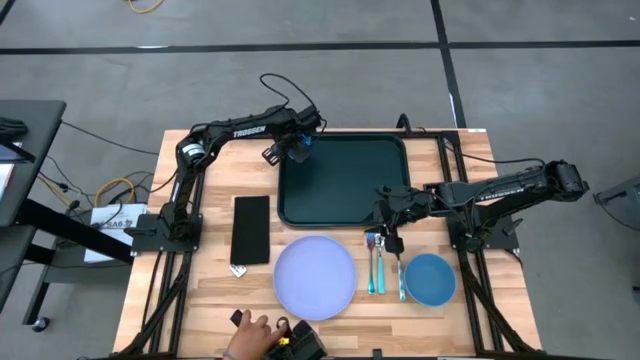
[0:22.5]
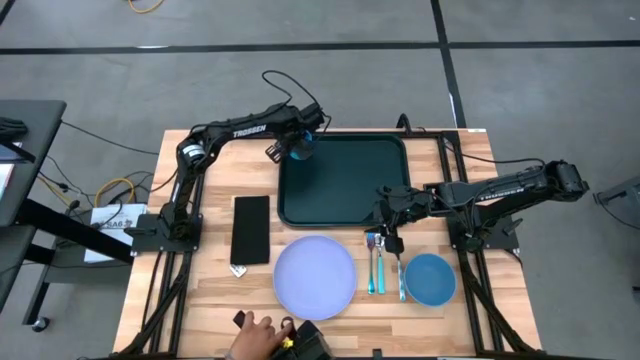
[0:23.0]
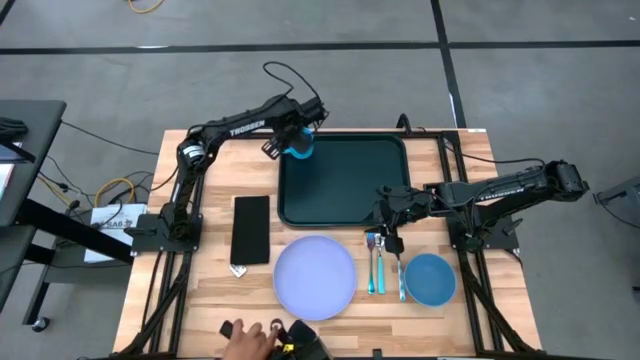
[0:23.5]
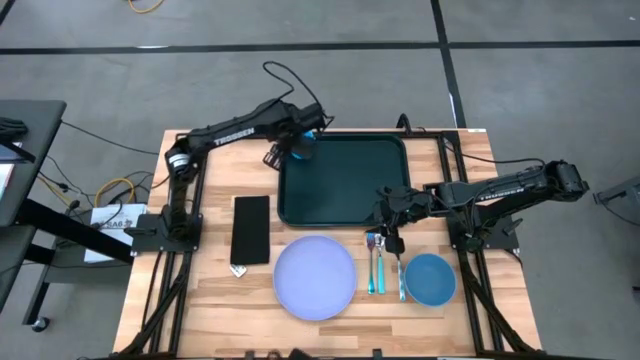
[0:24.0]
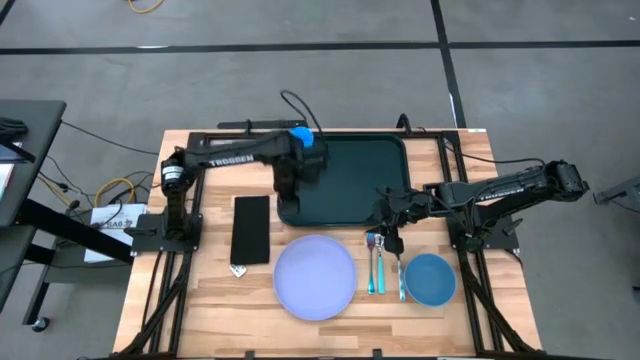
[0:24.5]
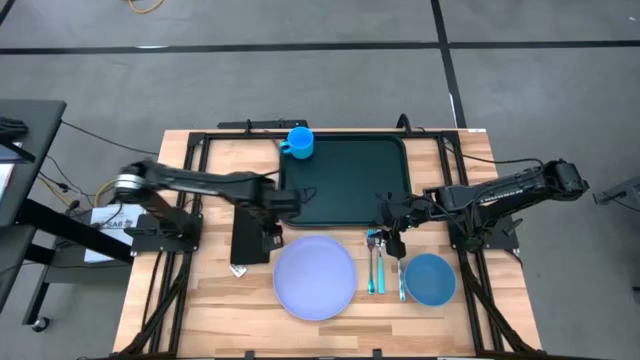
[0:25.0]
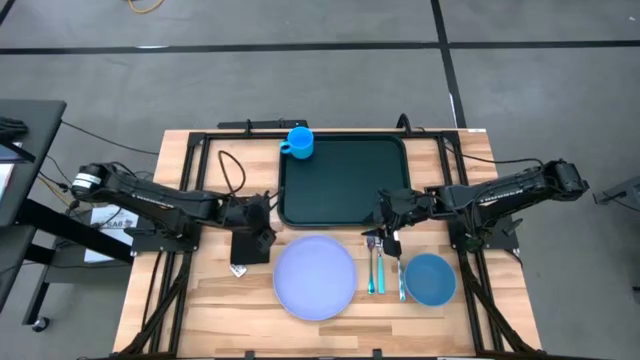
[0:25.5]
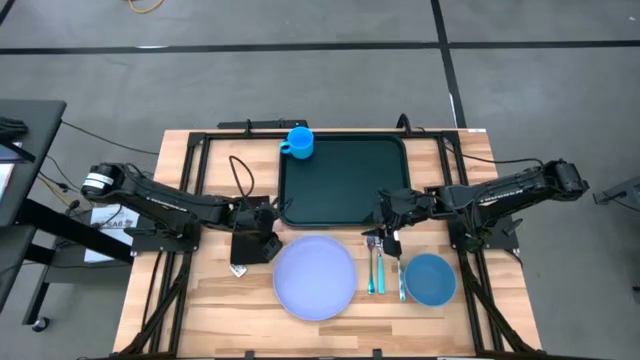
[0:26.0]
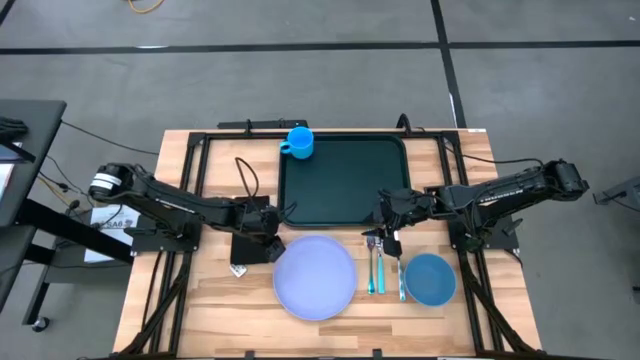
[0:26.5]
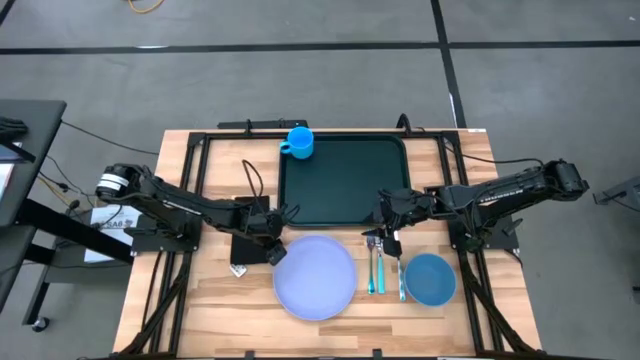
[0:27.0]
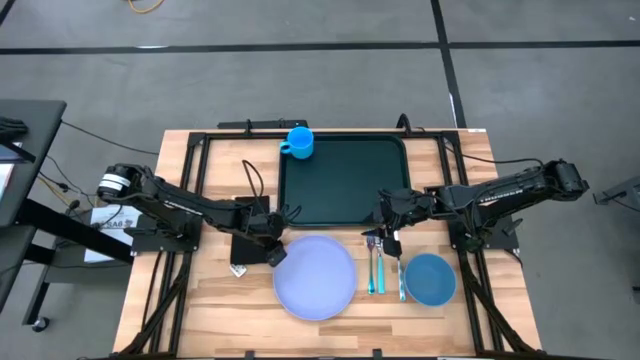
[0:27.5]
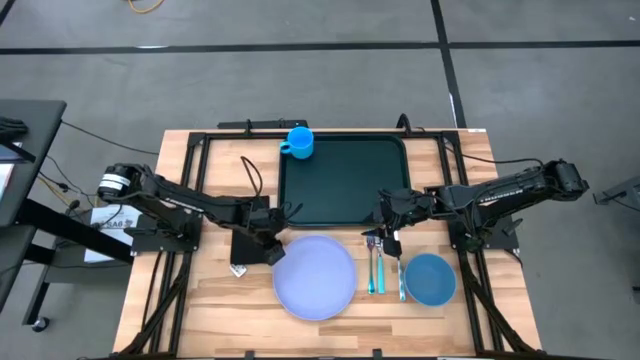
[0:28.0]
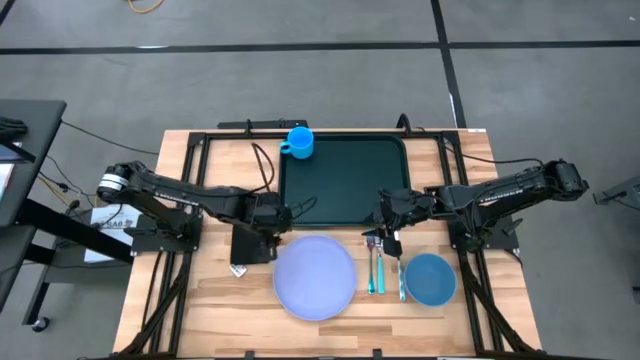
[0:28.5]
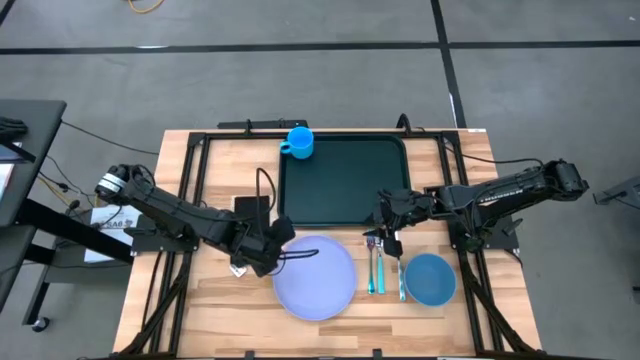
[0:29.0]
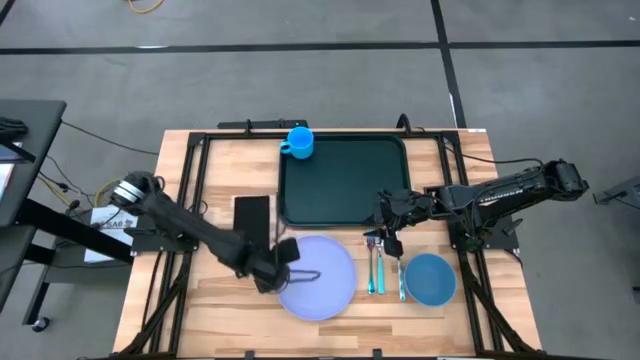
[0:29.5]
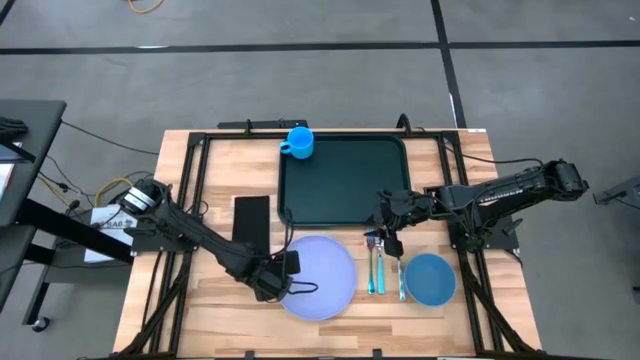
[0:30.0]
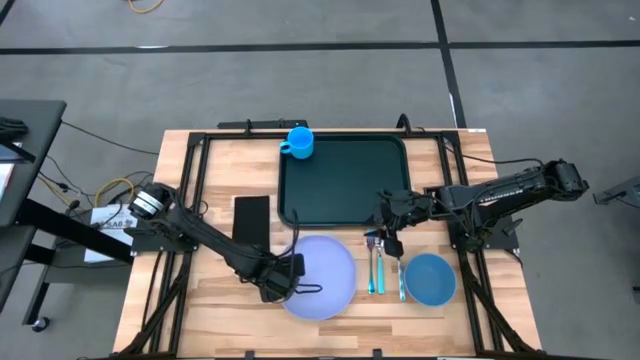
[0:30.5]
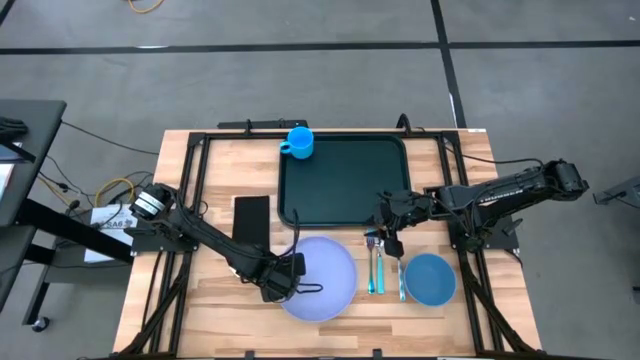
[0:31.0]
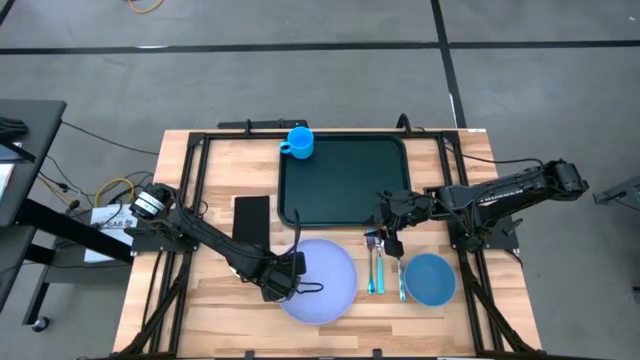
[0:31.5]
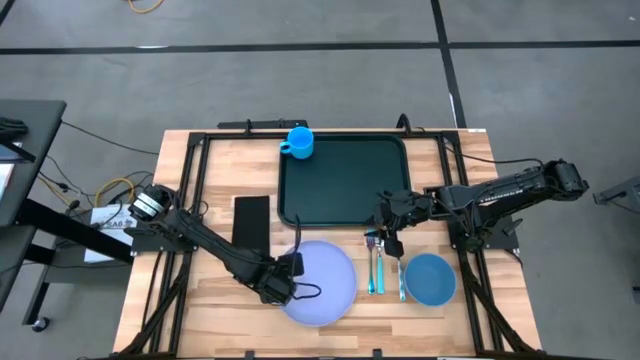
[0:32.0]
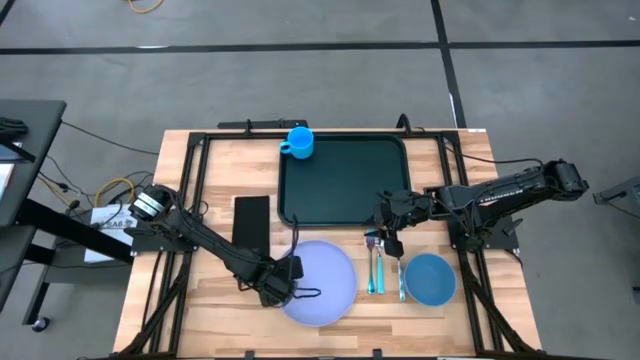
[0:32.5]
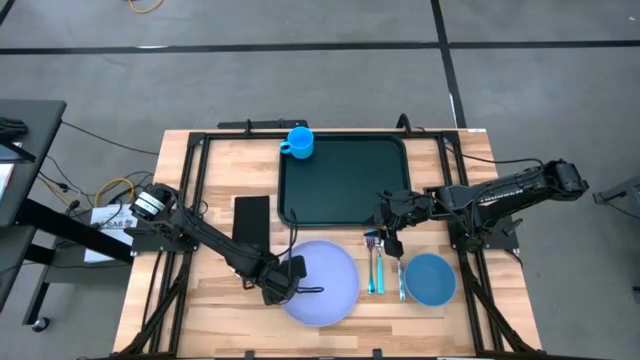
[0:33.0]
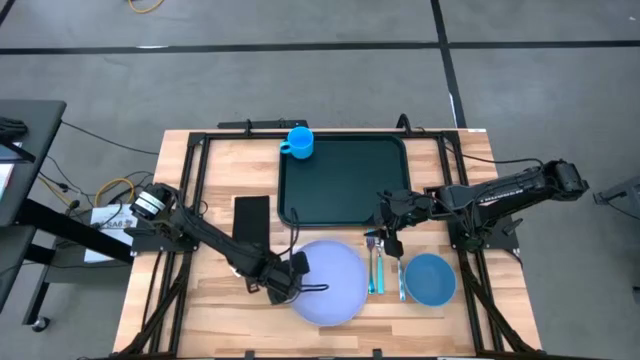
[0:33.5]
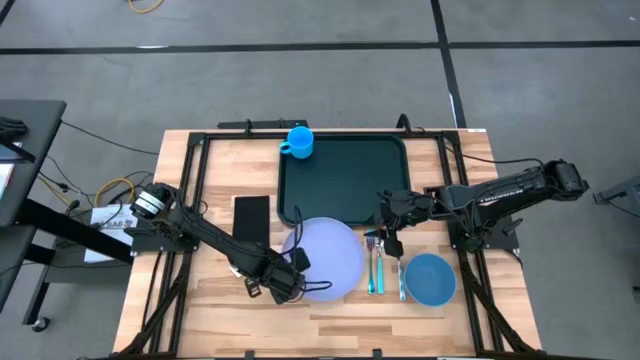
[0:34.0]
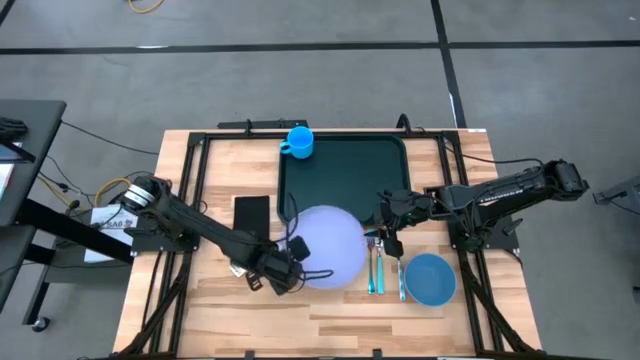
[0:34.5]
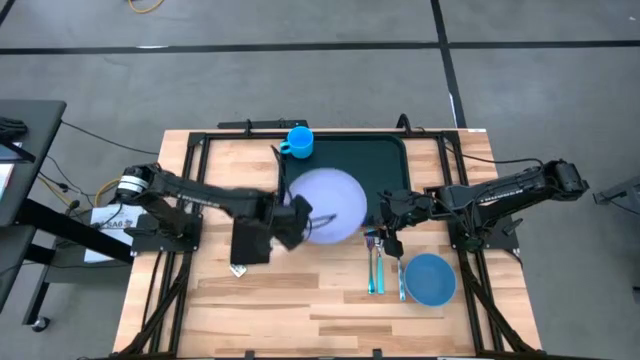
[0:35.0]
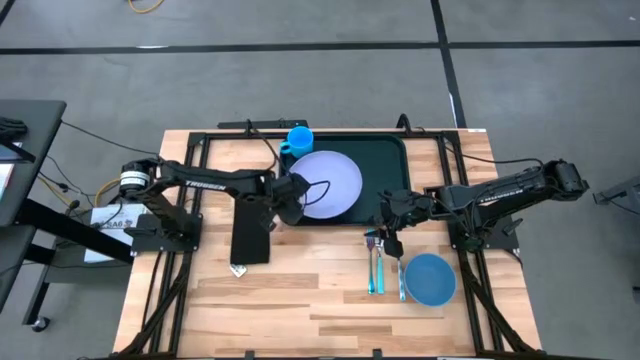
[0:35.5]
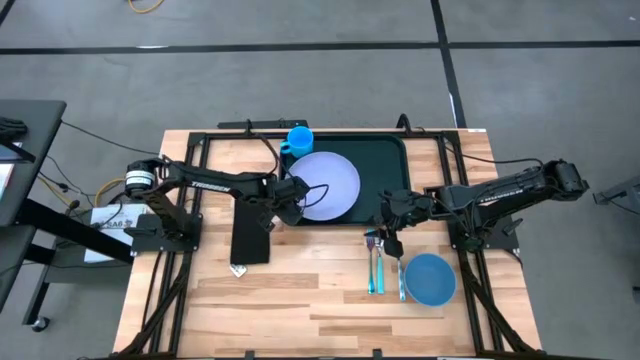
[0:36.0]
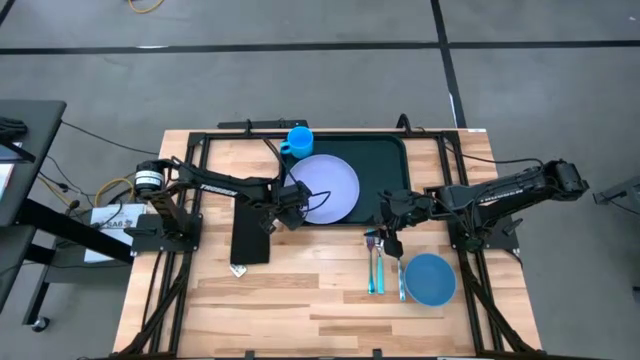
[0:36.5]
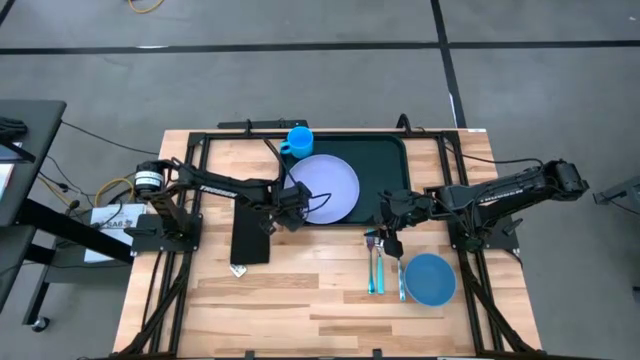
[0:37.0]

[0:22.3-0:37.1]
Task: Set up tray
Put the purple plate on the black tray

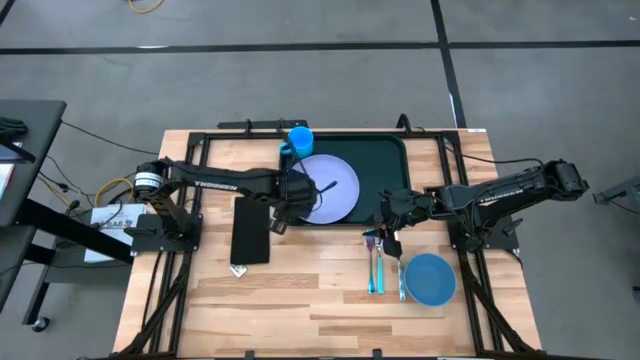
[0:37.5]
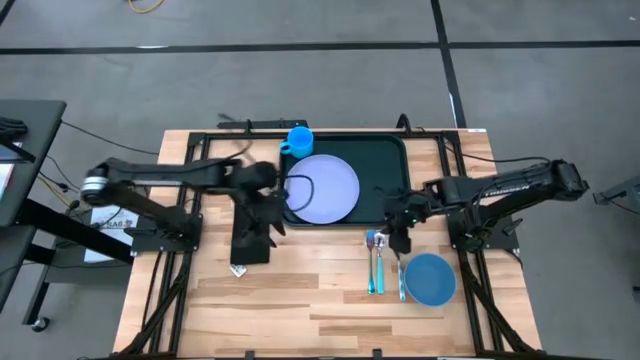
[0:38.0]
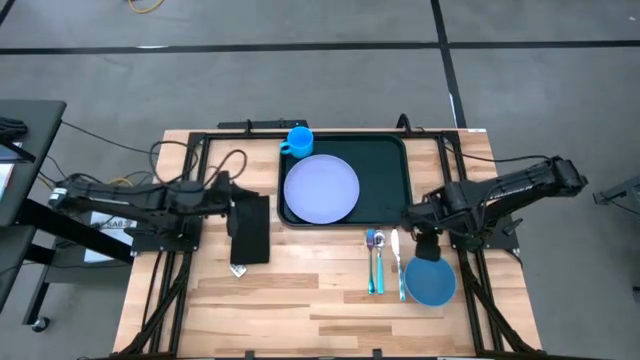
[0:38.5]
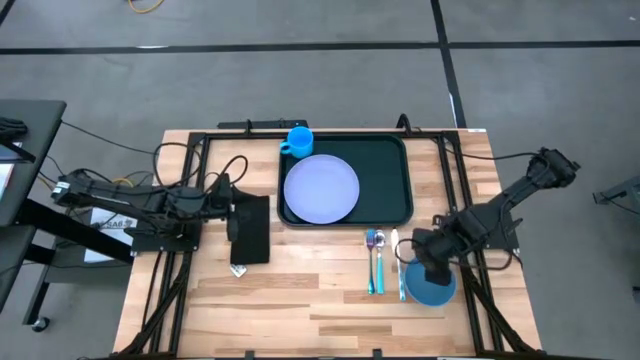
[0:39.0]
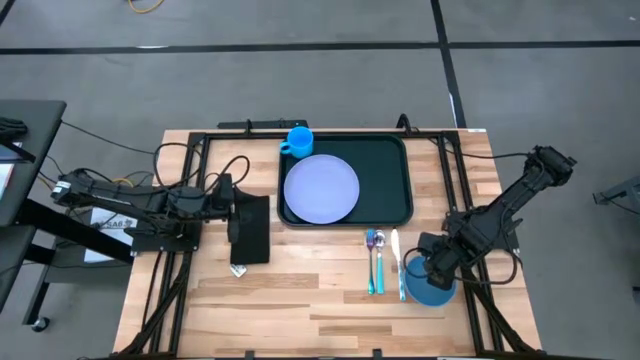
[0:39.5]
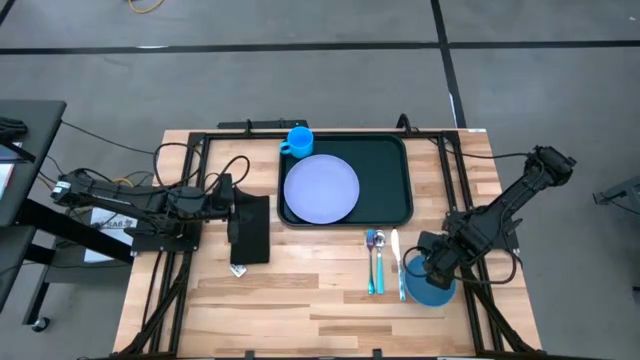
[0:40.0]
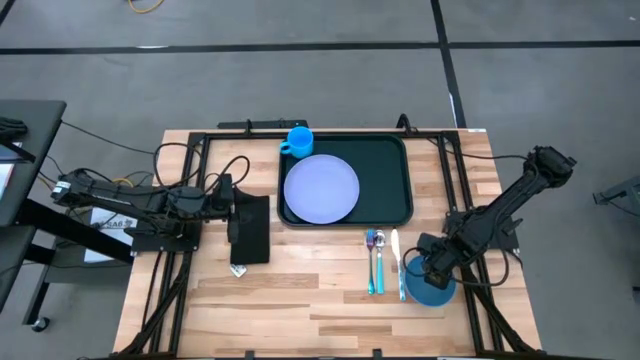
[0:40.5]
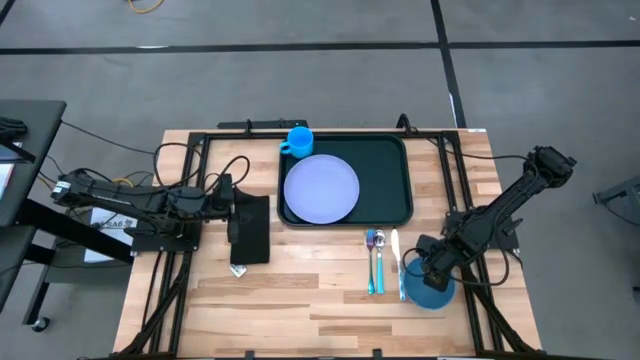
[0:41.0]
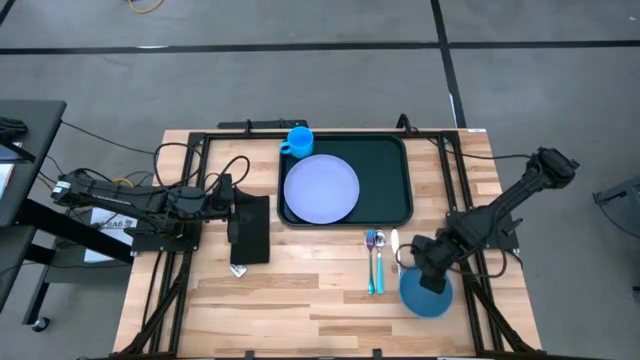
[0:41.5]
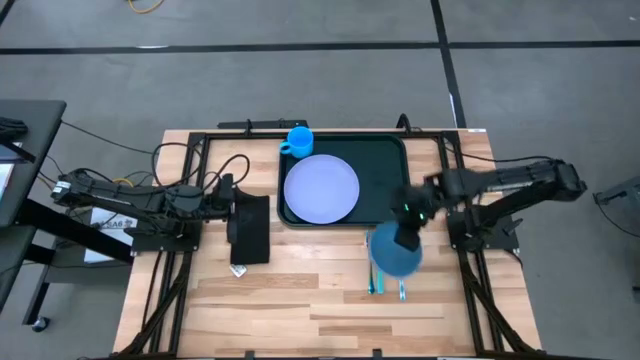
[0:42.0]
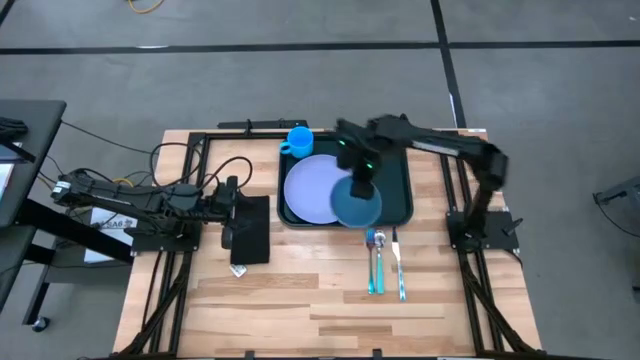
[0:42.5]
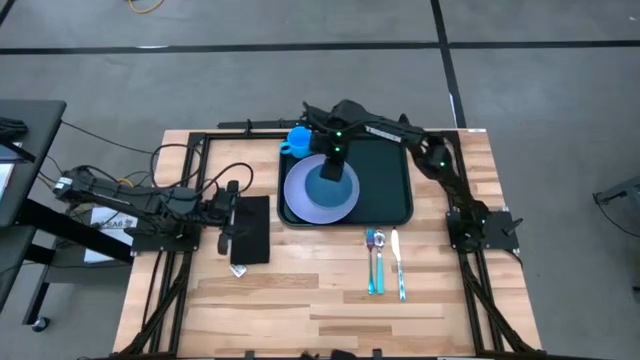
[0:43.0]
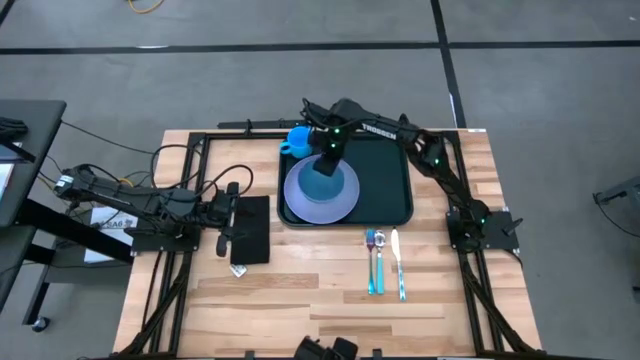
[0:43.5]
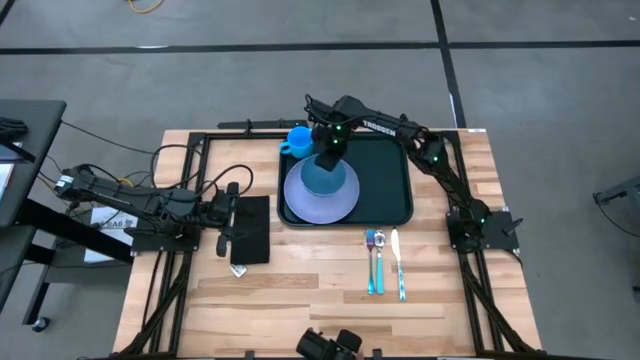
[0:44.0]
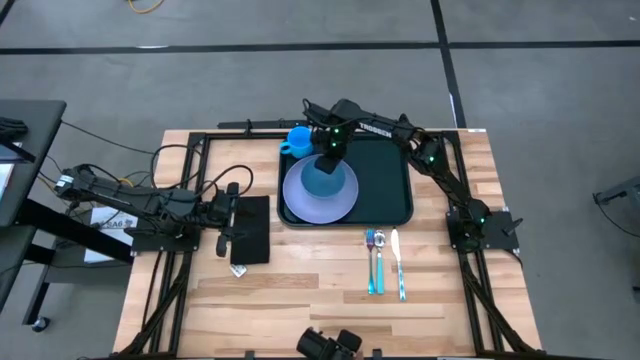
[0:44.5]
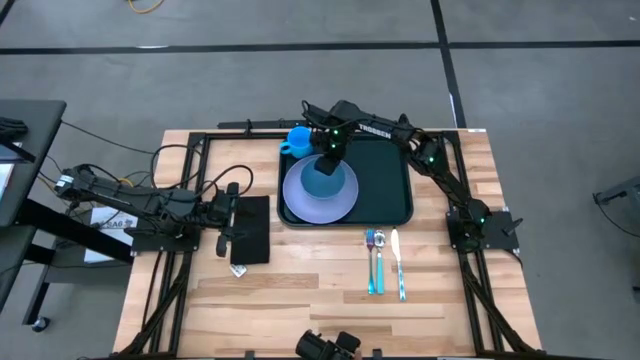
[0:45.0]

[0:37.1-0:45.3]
Put the blue bowl on top of the purple plate
